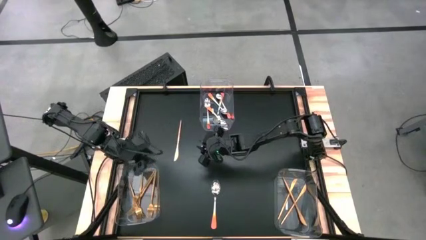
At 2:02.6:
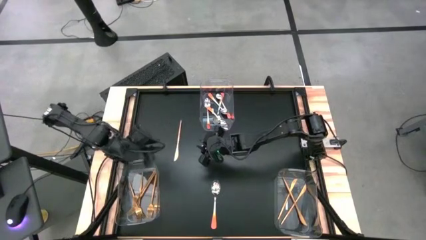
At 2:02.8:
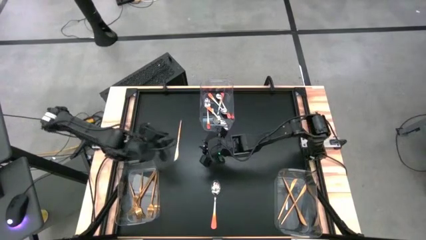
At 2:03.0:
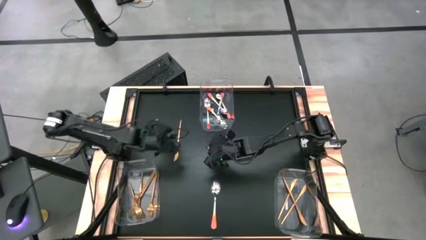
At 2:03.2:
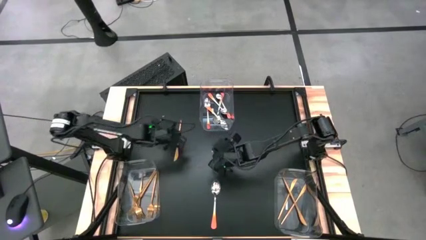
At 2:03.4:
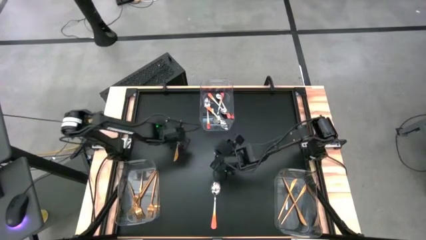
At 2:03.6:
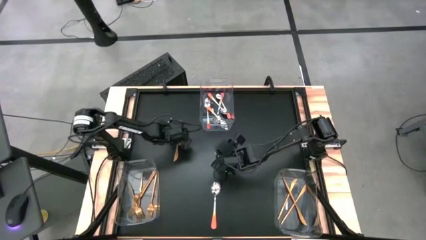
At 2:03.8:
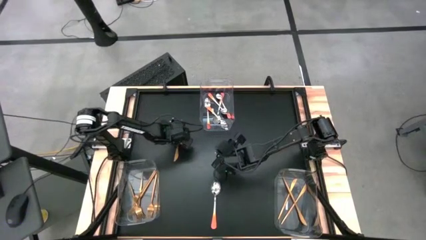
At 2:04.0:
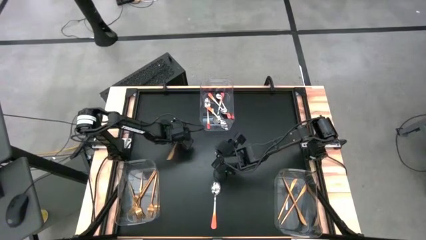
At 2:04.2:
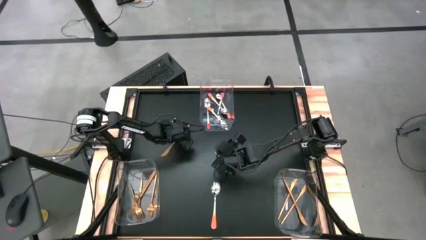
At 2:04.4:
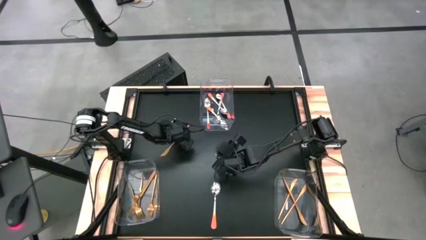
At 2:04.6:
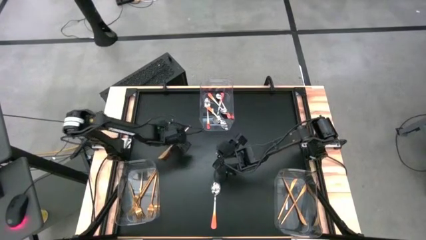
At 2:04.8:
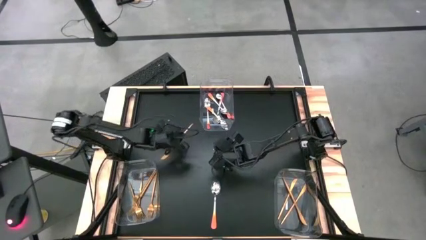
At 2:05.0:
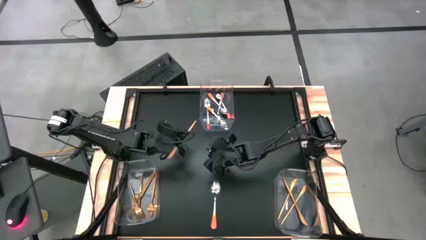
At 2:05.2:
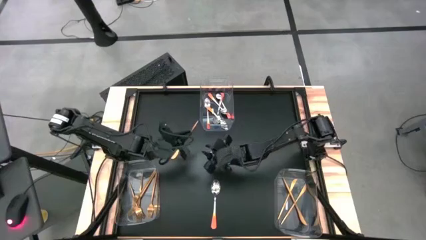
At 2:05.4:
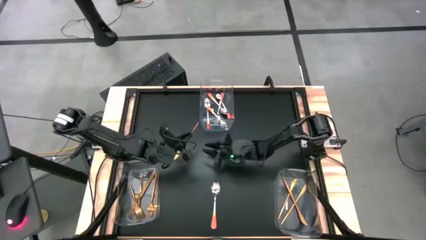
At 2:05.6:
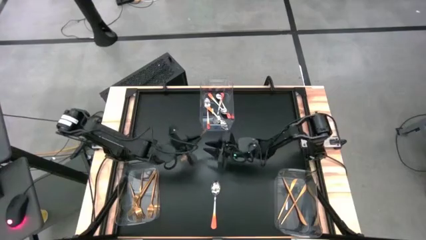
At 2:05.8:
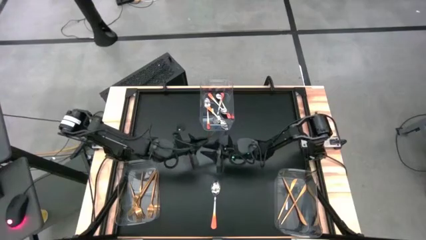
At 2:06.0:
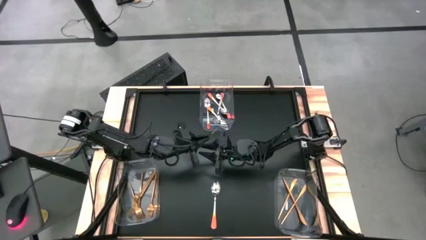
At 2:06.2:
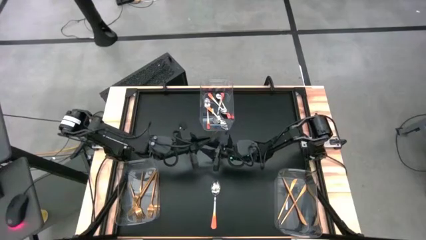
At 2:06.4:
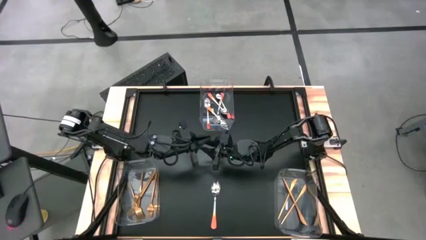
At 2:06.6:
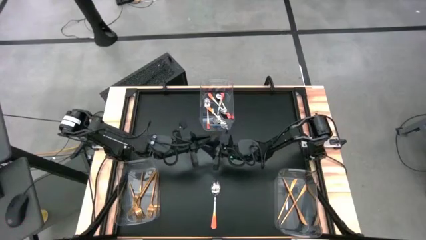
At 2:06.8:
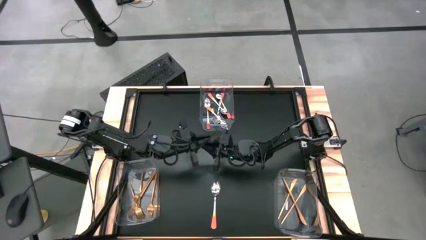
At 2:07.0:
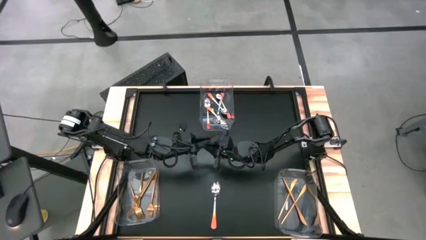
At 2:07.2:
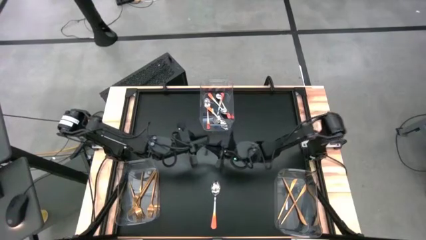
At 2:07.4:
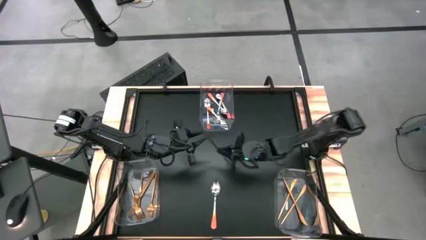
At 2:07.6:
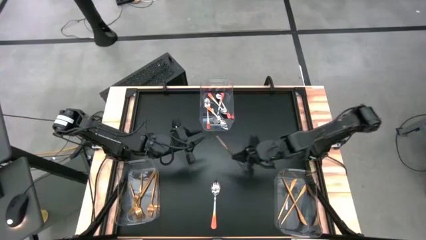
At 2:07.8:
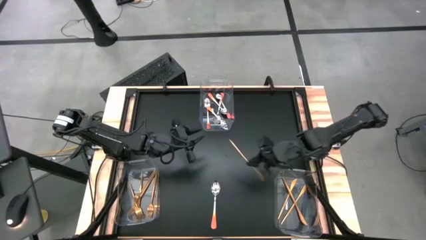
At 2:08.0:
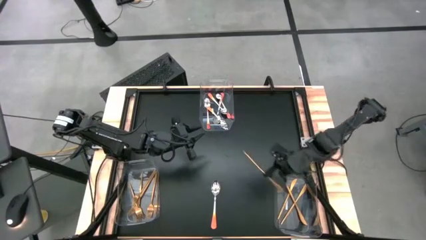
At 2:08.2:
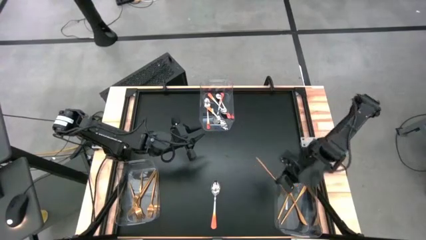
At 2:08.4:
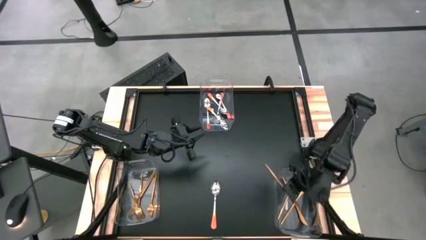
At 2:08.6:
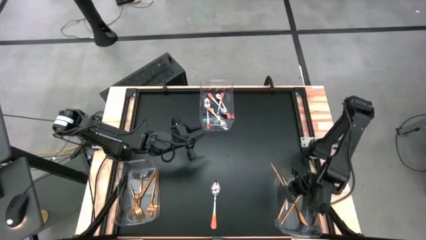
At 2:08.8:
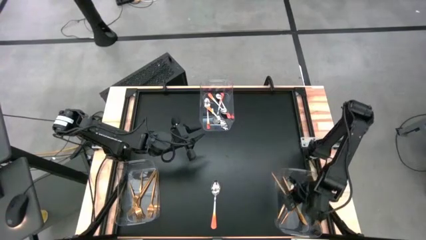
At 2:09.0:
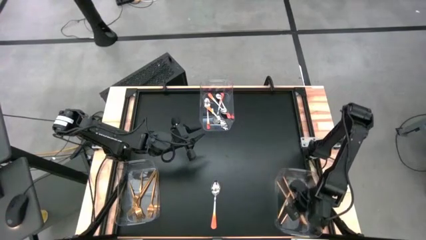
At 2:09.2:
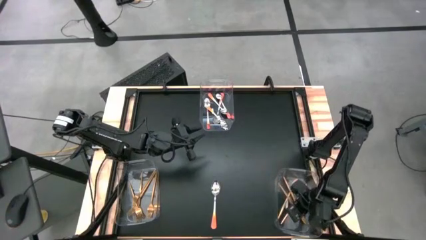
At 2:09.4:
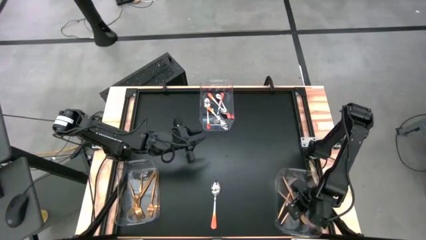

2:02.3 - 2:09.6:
Task: Sort silverware by color (type)
Put the gold knife into the bottom right transparent bin

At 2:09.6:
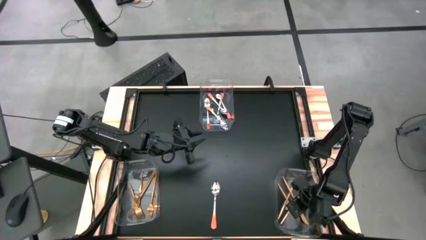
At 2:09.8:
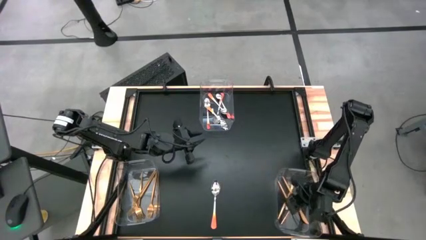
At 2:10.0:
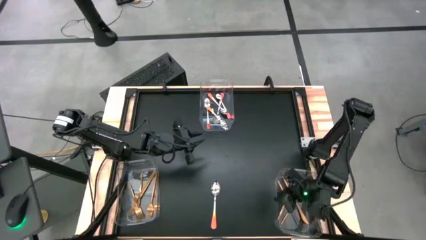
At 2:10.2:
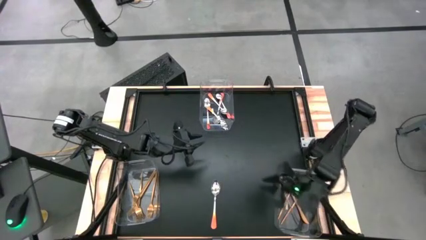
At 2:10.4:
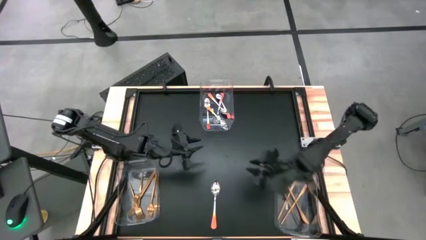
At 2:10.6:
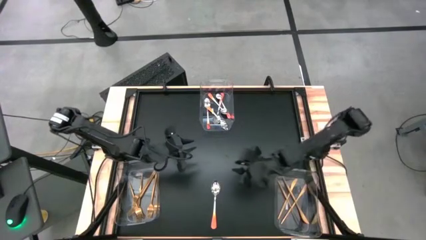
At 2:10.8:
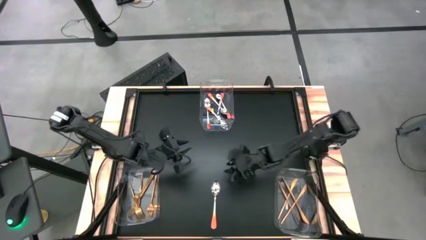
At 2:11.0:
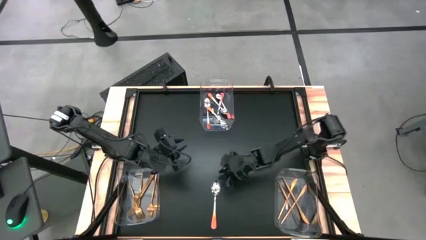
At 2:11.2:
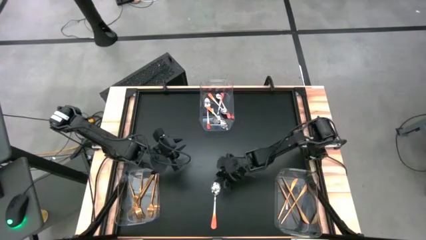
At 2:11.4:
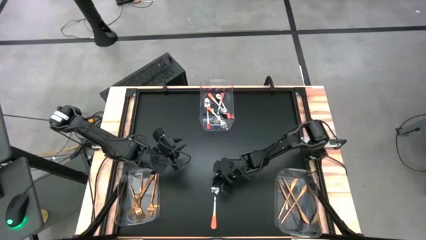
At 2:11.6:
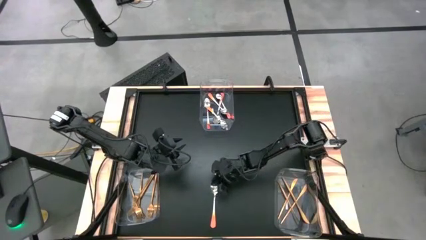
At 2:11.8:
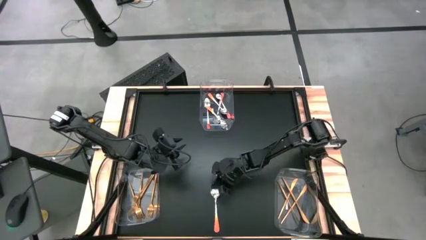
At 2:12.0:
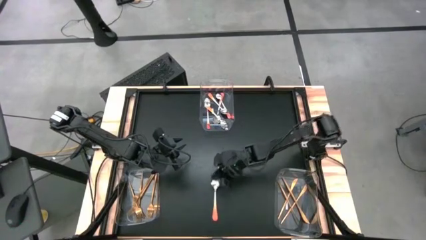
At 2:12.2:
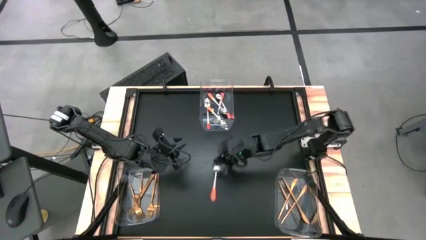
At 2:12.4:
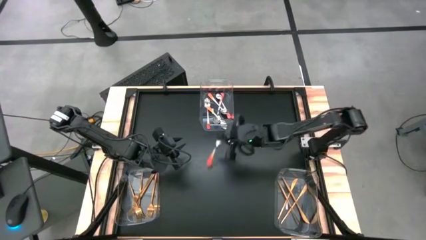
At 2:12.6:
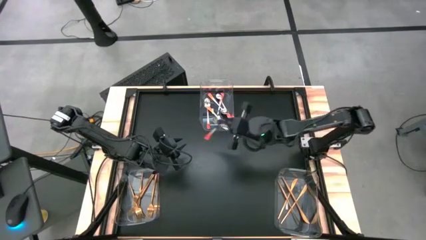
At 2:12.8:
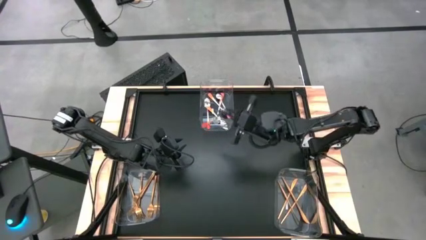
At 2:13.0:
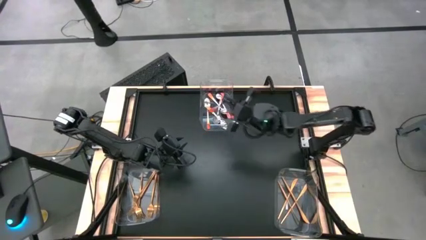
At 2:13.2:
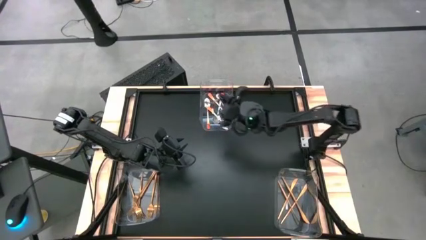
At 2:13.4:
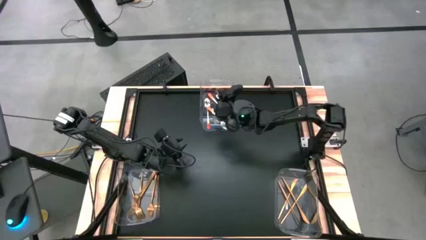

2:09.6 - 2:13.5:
Put the orange spoon into the top transparent bin

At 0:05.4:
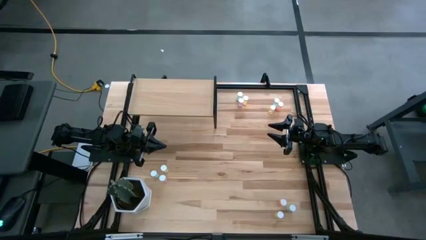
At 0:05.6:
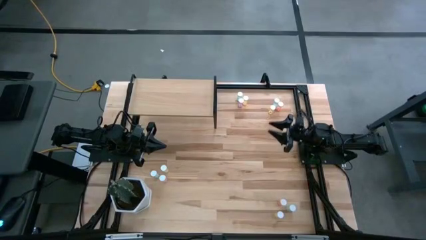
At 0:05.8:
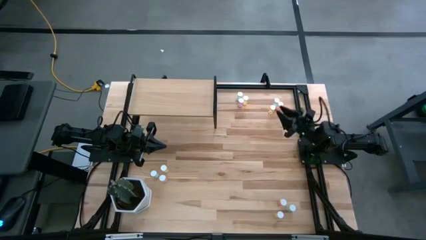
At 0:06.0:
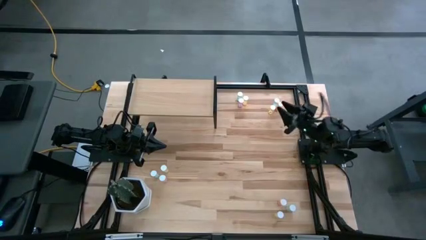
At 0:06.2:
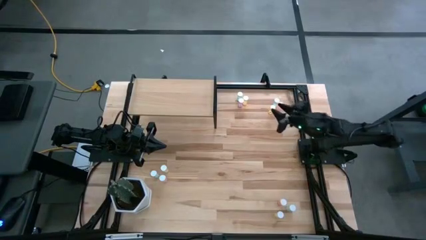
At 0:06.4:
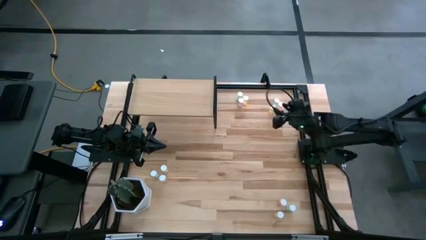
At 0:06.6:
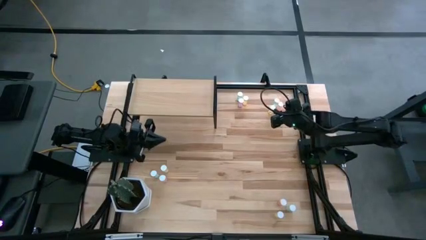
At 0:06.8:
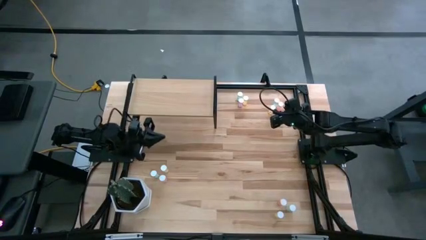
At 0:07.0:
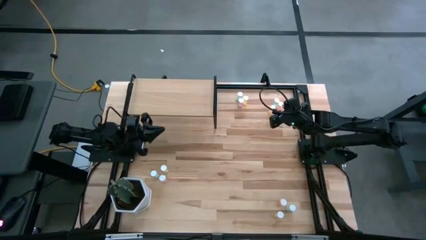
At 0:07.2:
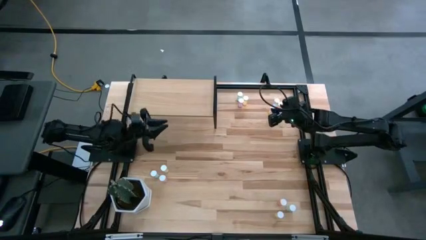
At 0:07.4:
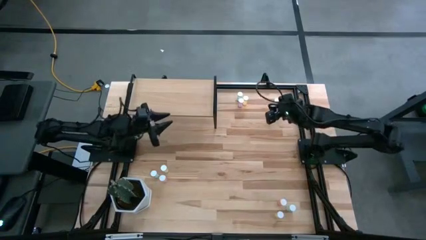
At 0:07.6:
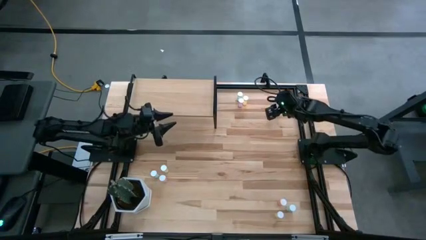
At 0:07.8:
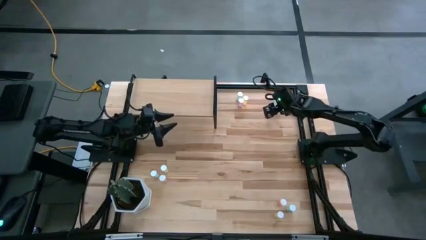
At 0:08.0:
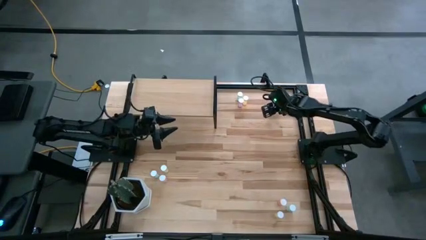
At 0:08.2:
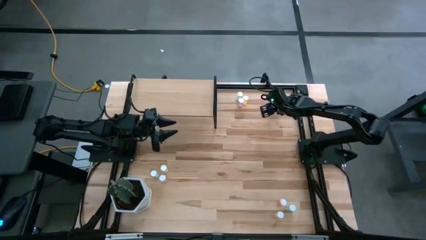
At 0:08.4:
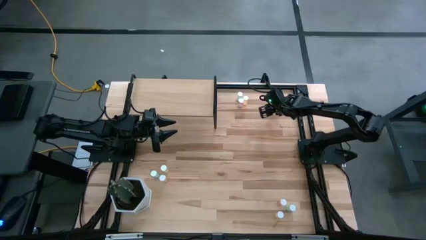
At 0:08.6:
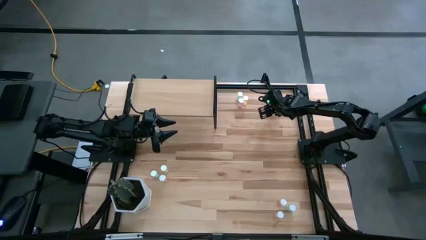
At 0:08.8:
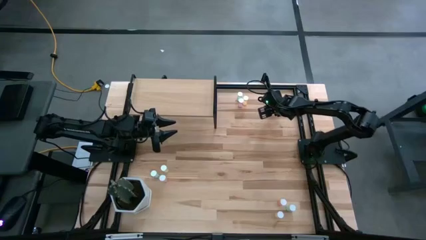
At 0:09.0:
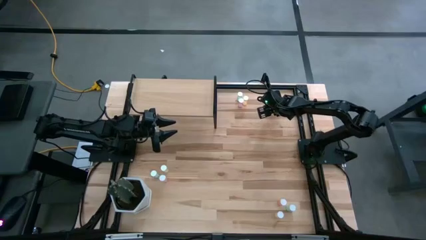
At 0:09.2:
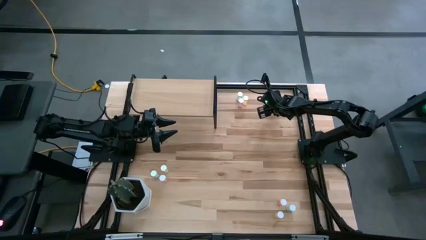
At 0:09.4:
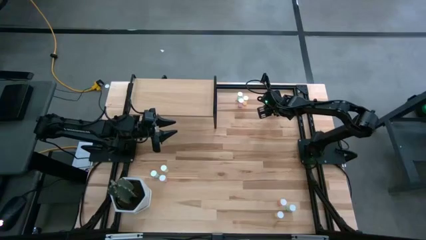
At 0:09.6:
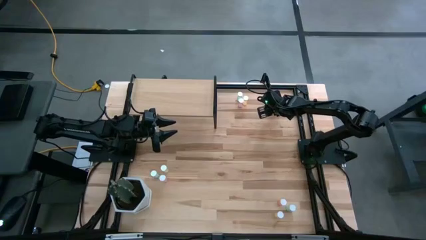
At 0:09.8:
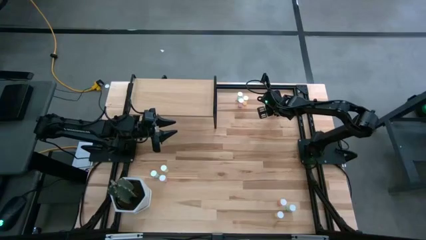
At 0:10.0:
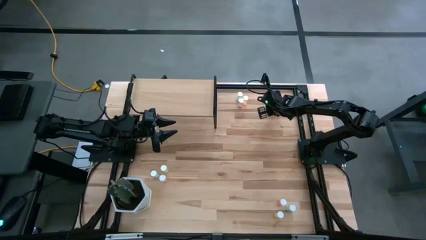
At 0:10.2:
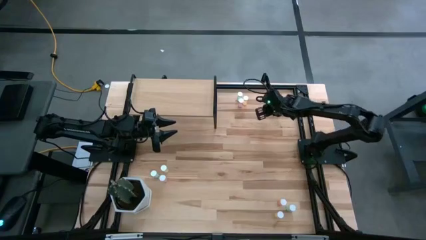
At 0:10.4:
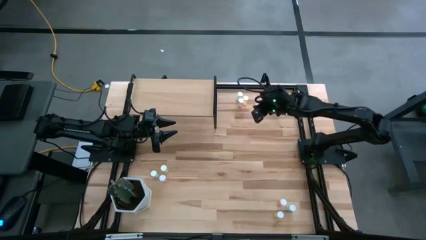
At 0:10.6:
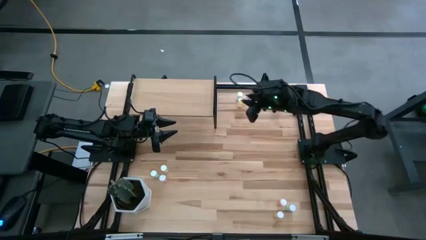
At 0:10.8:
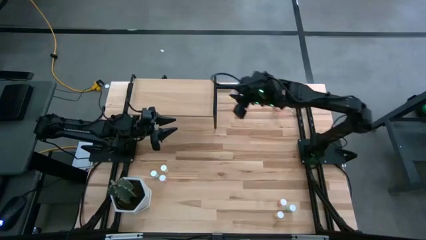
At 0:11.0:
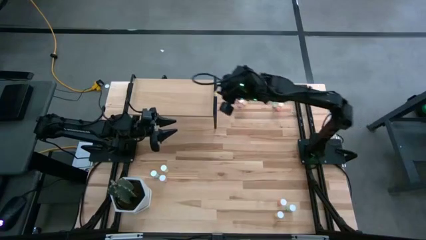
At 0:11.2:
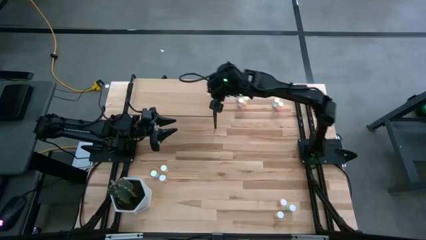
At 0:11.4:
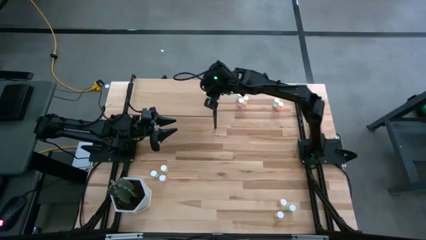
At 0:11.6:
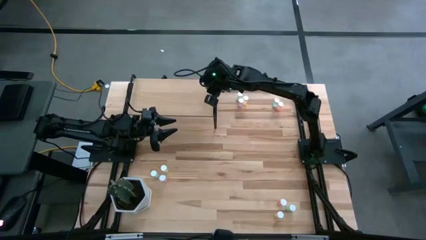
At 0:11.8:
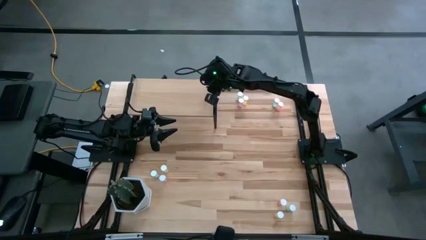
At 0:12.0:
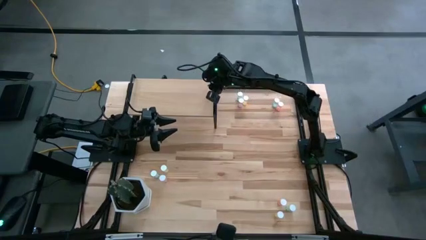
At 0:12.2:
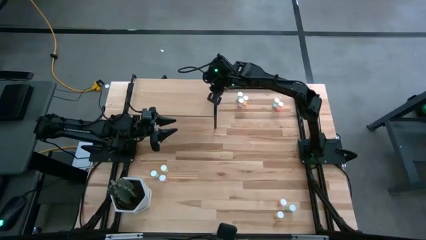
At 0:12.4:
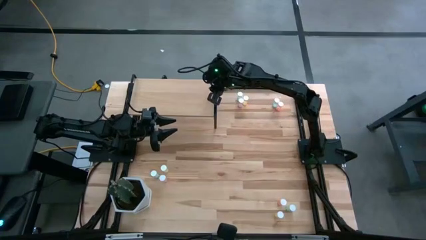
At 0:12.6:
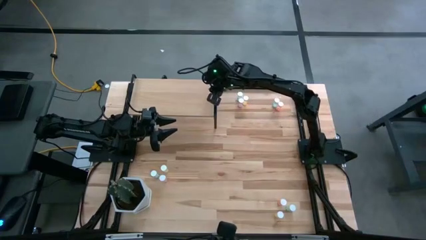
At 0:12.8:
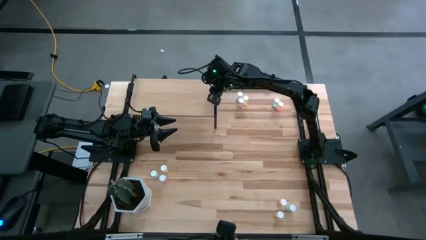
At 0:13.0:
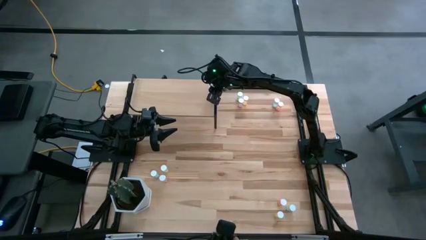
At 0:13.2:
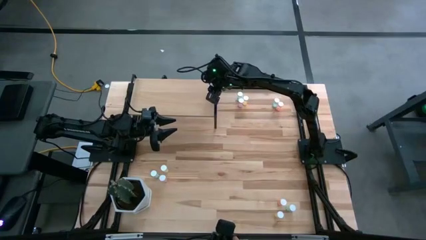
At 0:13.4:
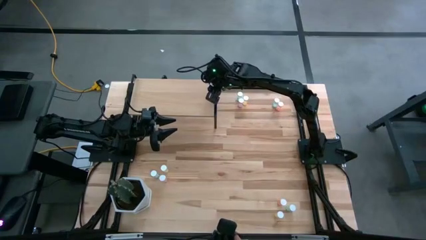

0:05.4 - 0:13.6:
Task: Pick and place medicine bottles onto shelf by color
Put the top right yellow pill bottle on the shelf
